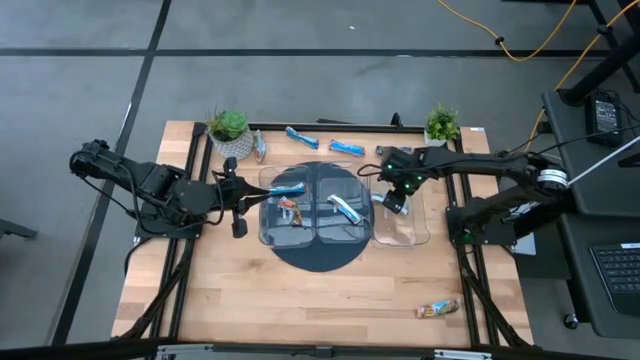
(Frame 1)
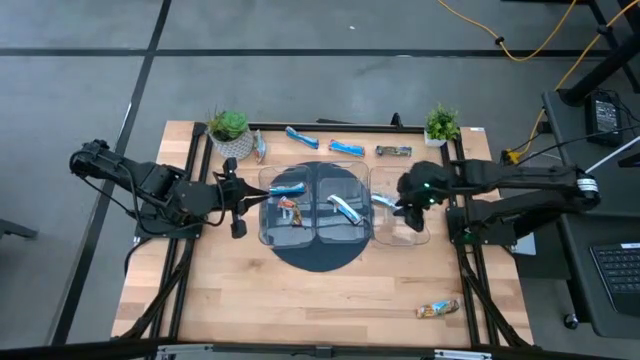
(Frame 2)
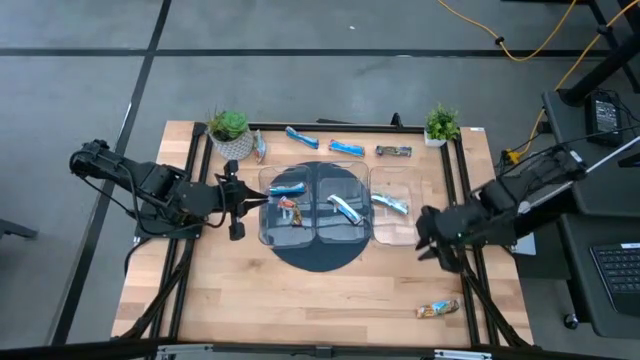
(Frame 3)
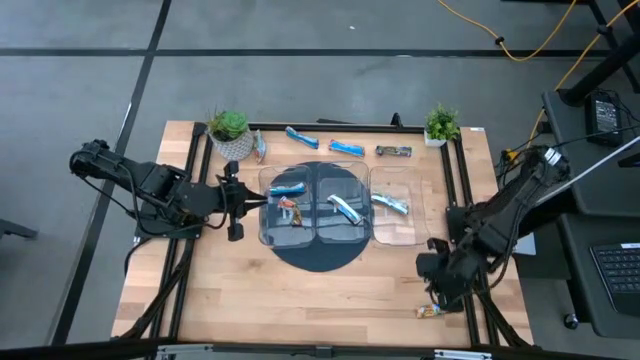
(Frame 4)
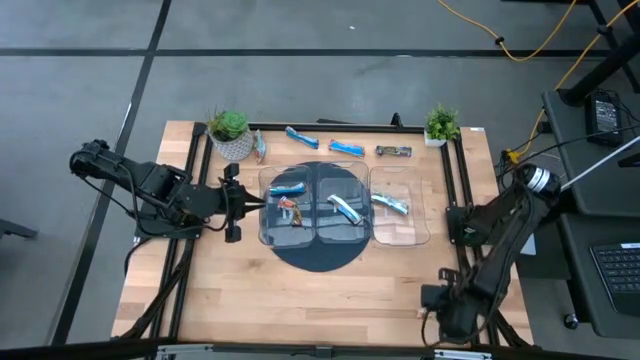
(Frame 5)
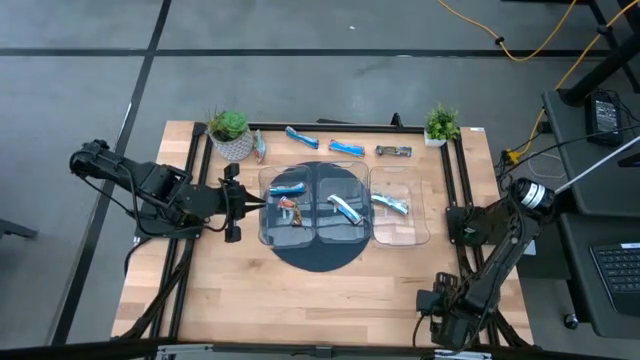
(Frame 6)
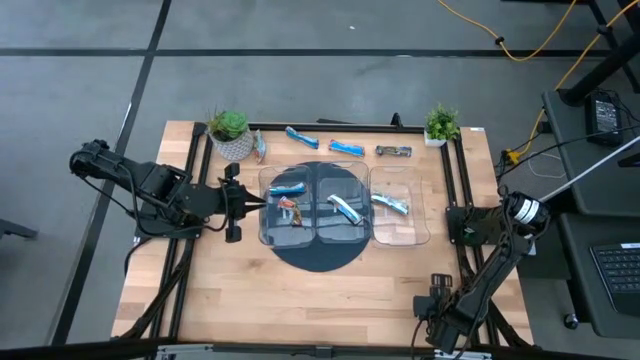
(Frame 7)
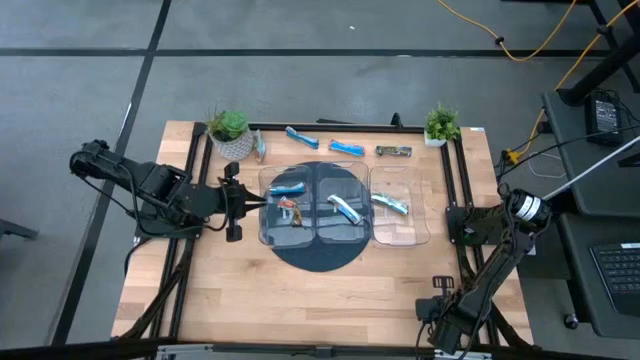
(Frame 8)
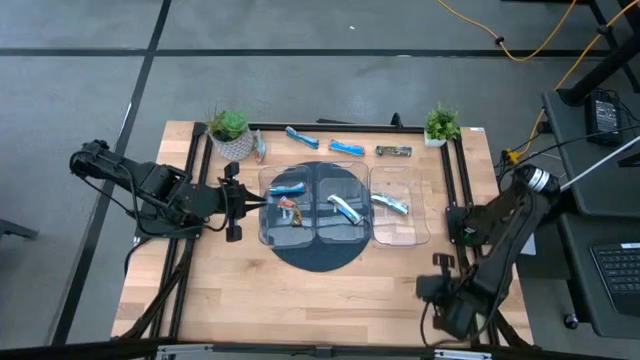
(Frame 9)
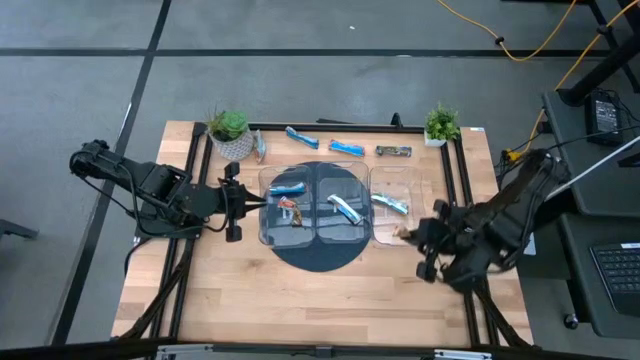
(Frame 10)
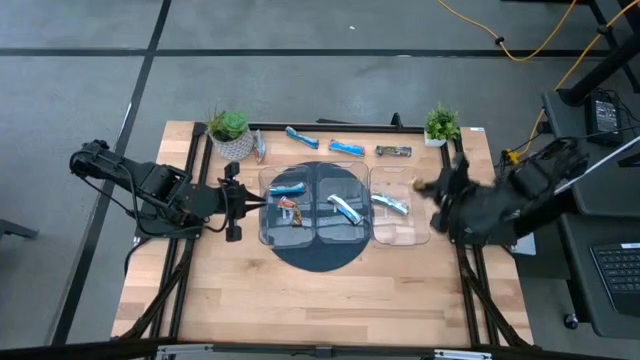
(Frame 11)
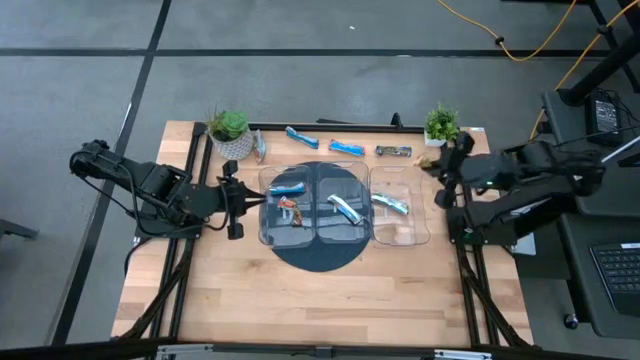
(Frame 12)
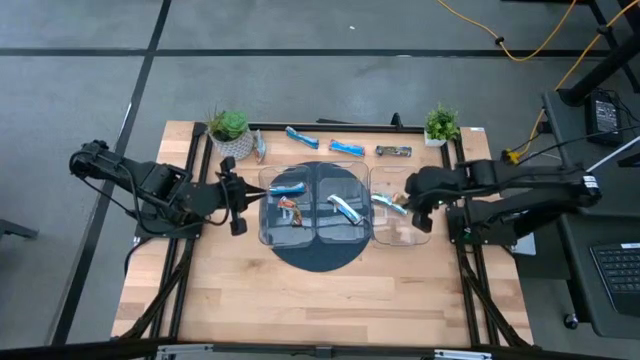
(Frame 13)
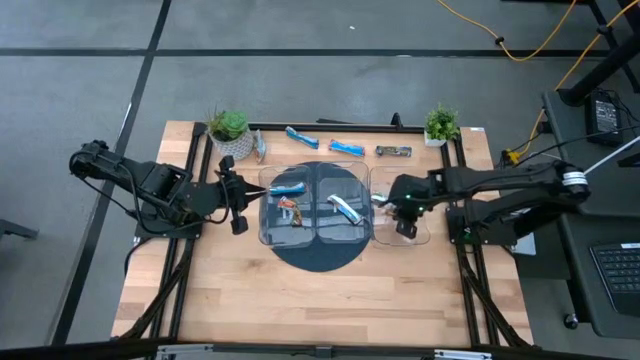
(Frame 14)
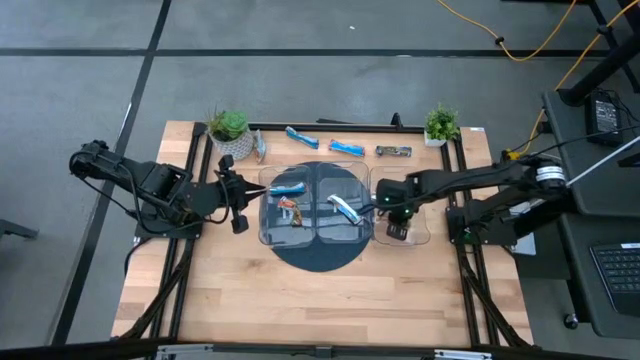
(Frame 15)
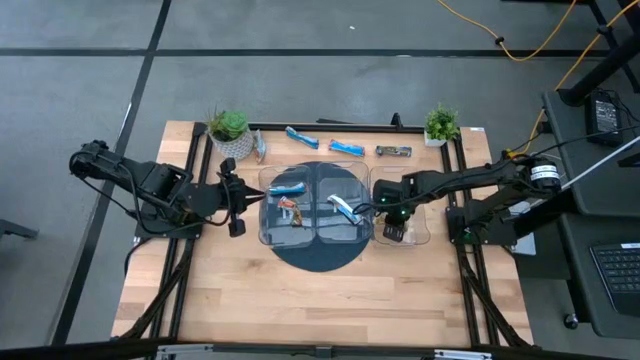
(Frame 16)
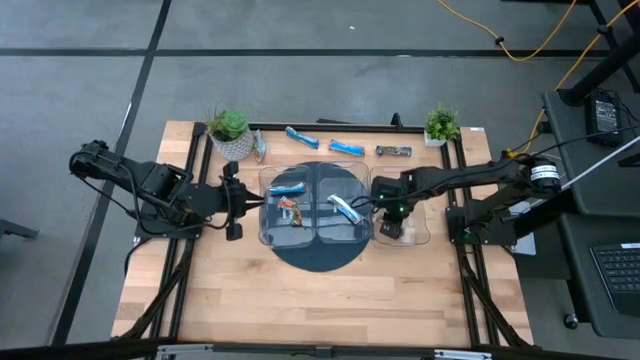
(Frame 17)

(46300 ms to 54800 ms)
Task: Pick and place Granola Bars by type
Put the yellow granola bar into the right transparent bin

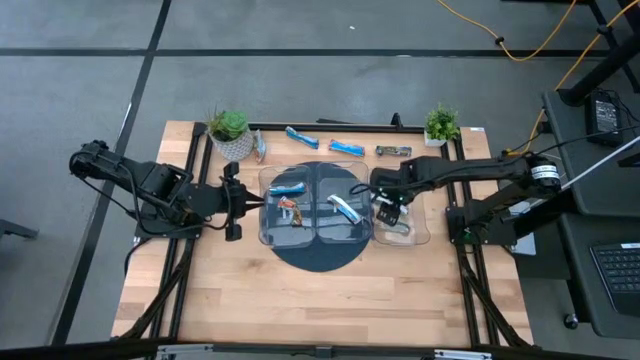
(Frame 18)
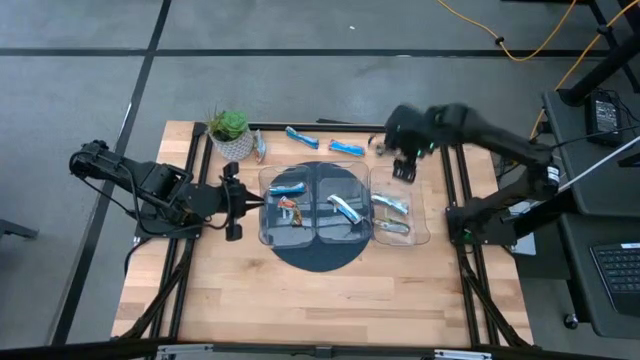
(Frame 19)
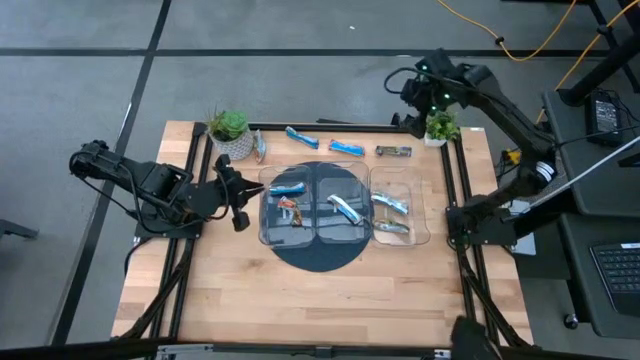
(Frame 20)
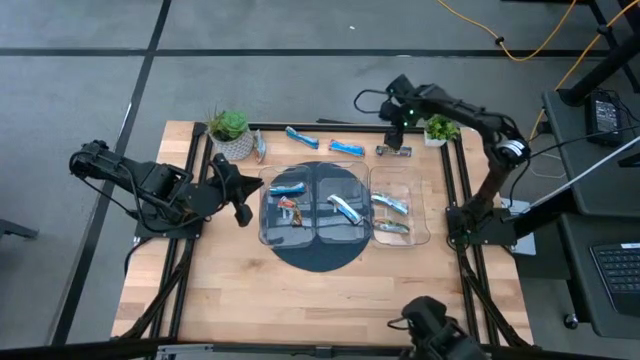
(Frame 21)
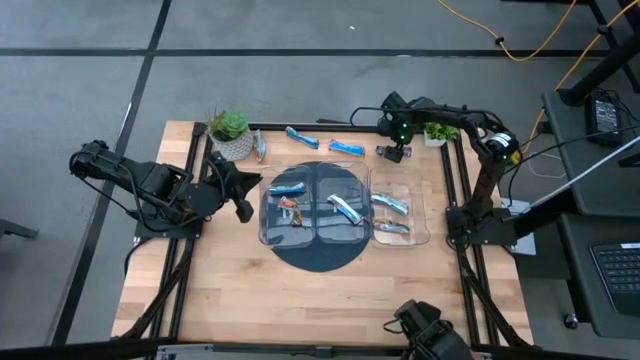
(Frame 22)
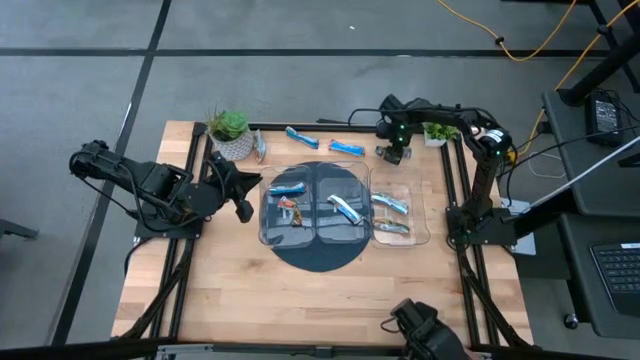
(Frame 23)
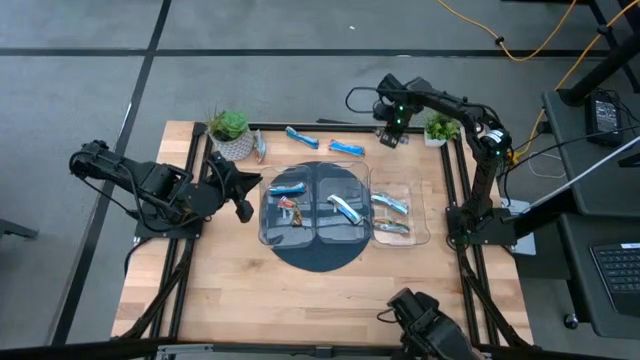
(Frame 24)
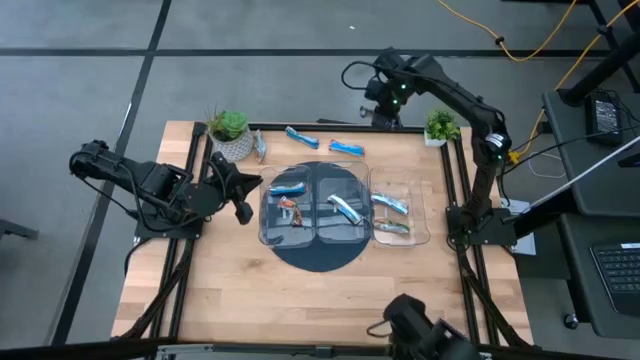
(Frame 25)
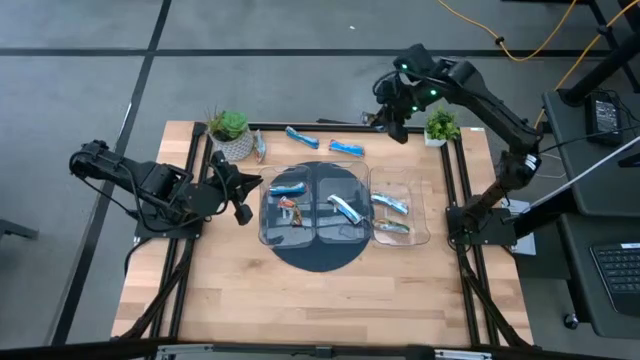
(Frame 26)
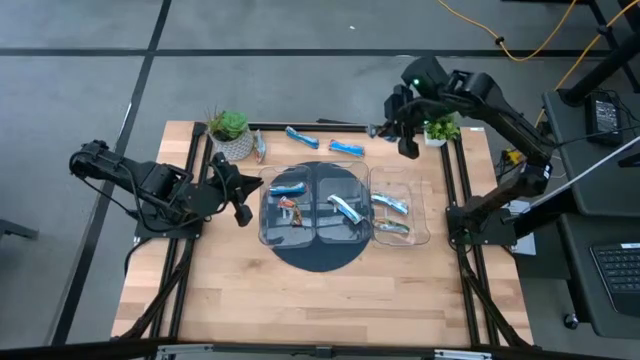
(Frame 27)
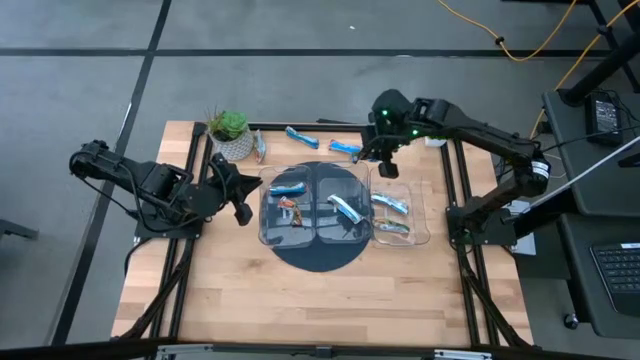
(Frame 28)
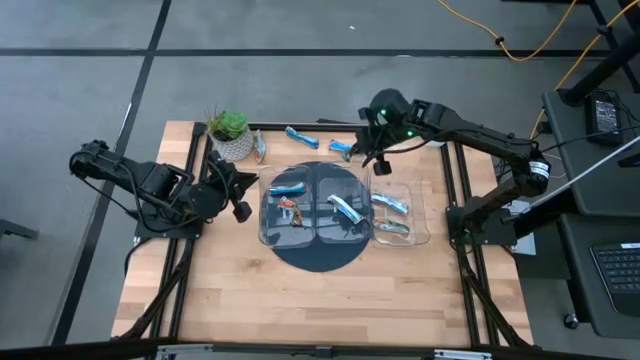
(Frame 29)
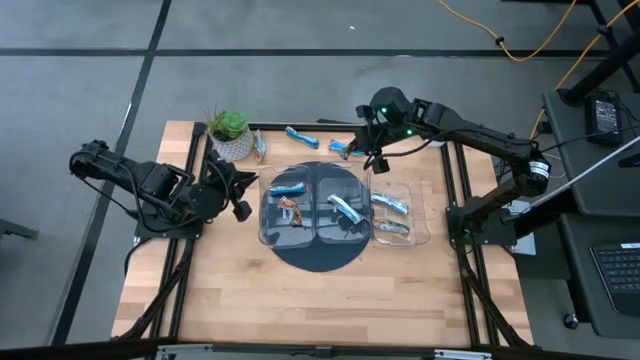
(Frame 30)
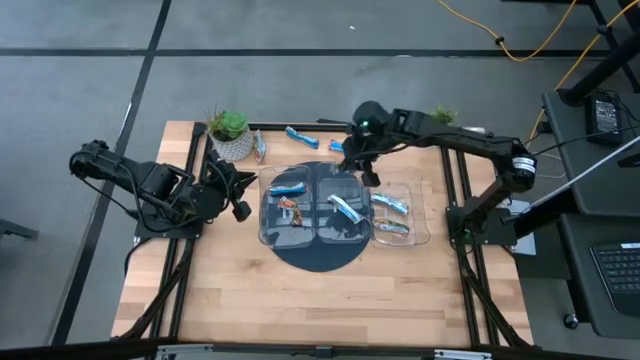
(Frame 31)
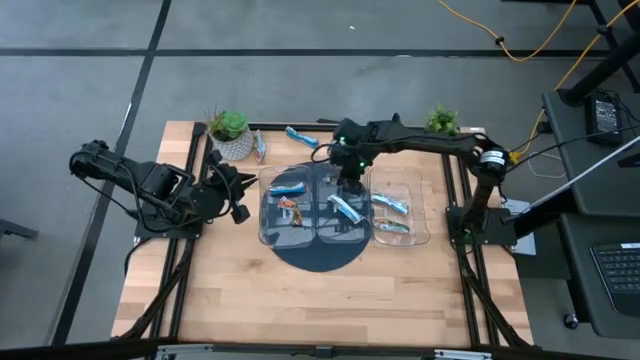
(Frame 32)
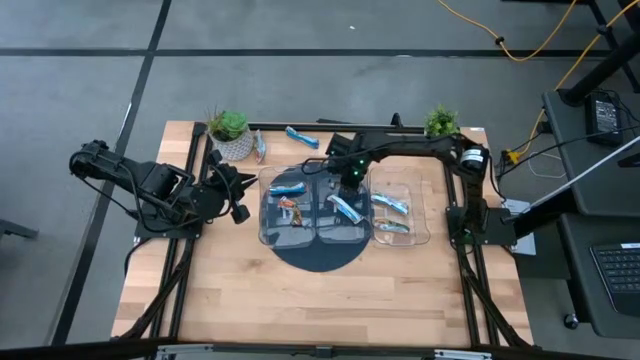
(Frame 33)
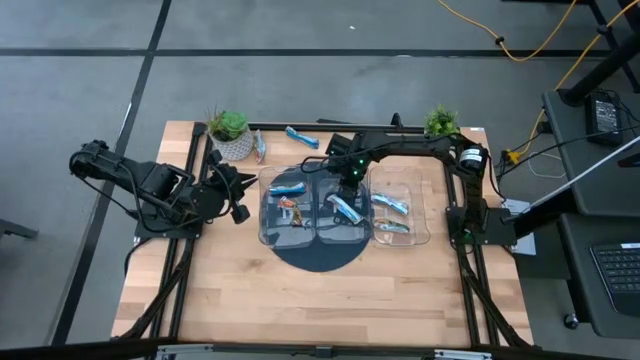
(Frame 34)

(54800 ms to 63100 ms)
Put the blue granola bar into the center transparent bin

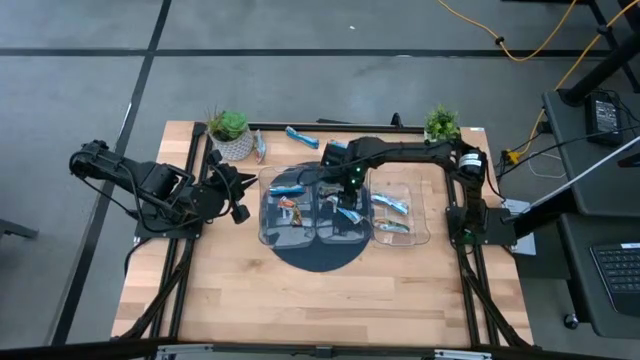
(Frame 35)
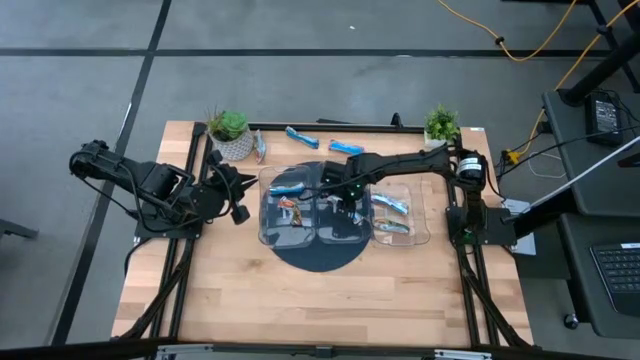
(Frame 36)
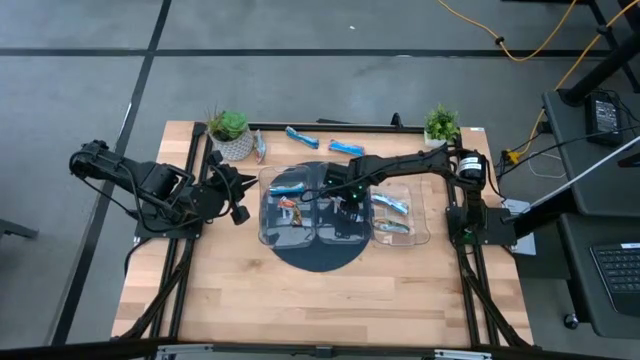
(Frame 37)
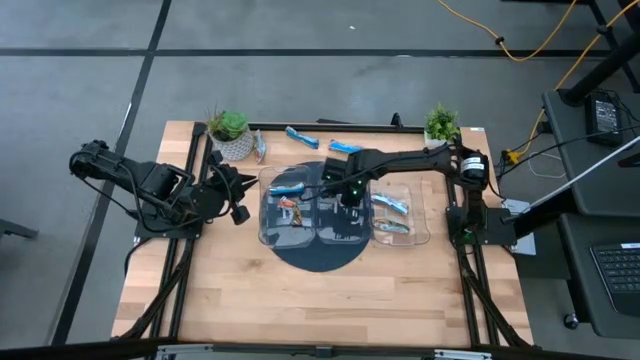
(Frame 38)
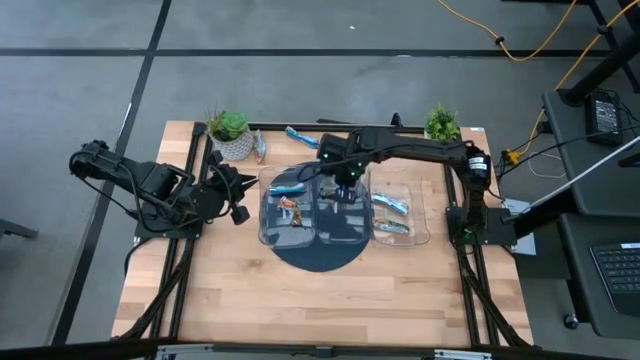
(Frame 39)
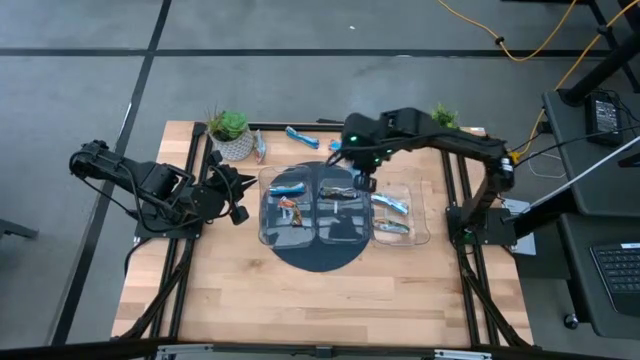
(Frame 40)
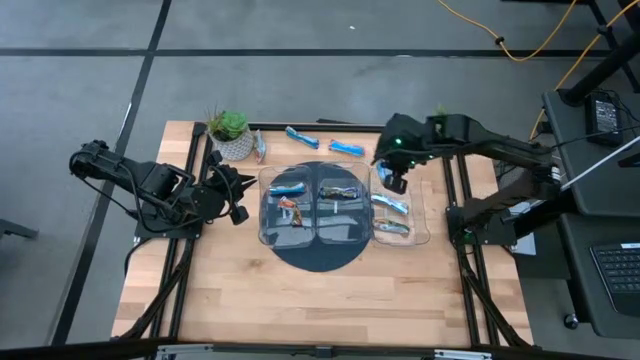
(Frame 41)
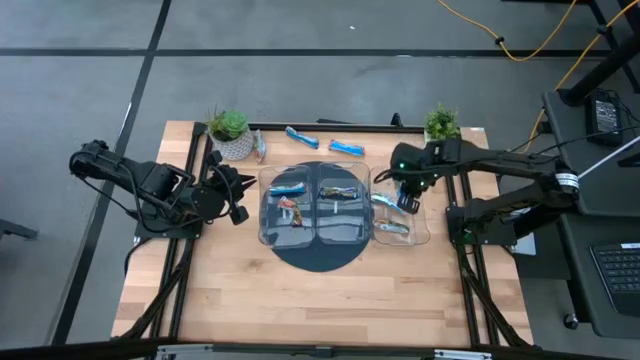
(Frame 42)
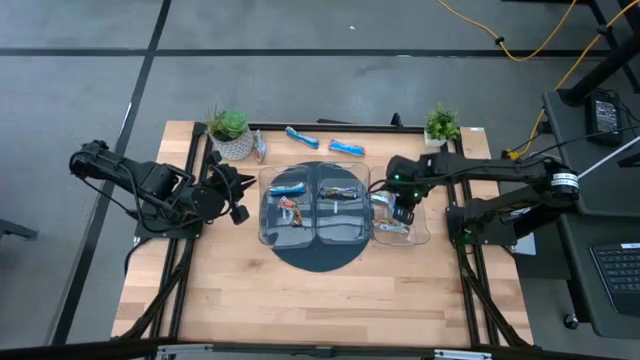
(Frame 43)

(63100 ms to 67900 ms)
Put the yellow granola bar from the center transparent bin into the right transparent bin
